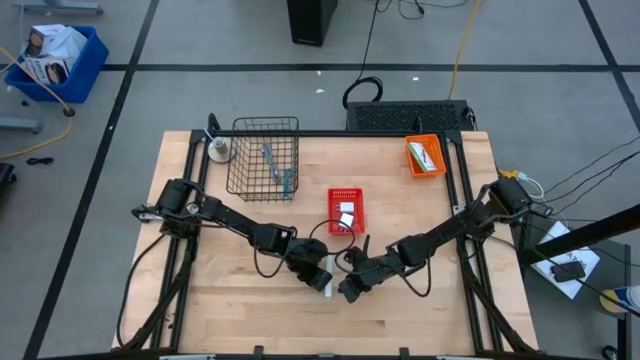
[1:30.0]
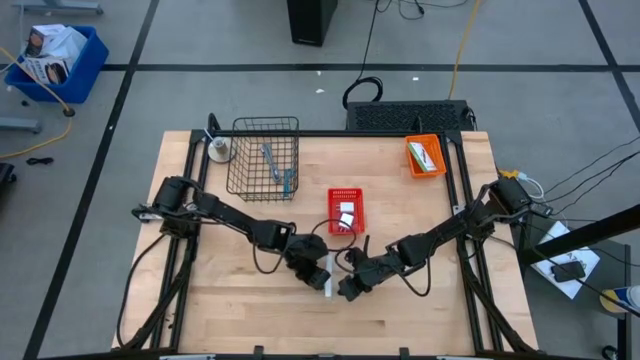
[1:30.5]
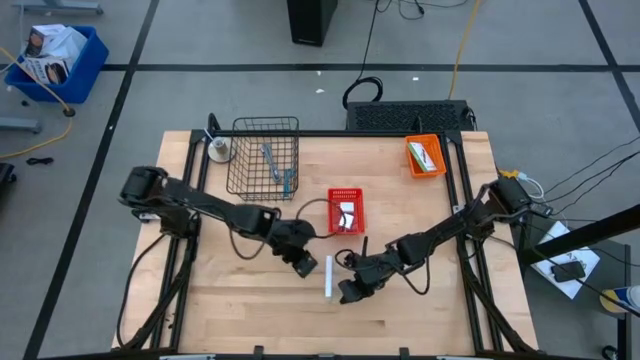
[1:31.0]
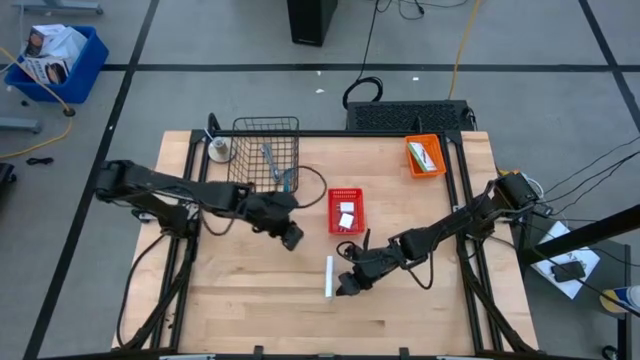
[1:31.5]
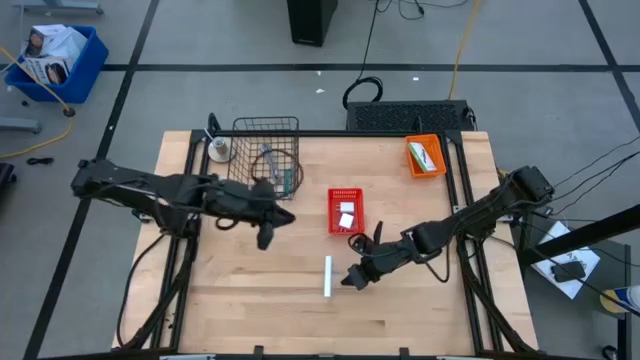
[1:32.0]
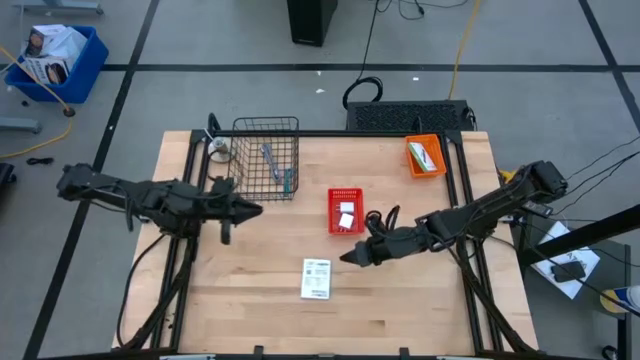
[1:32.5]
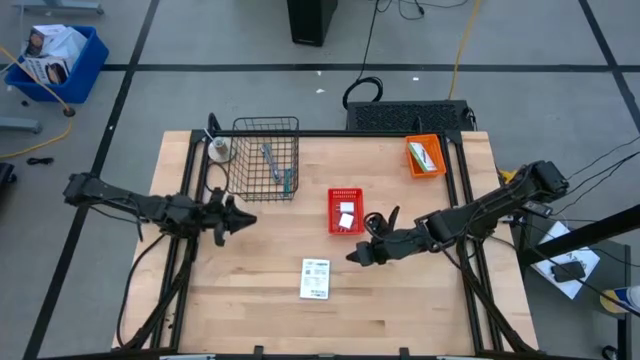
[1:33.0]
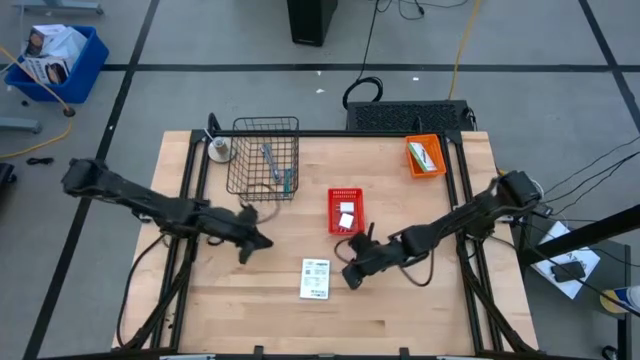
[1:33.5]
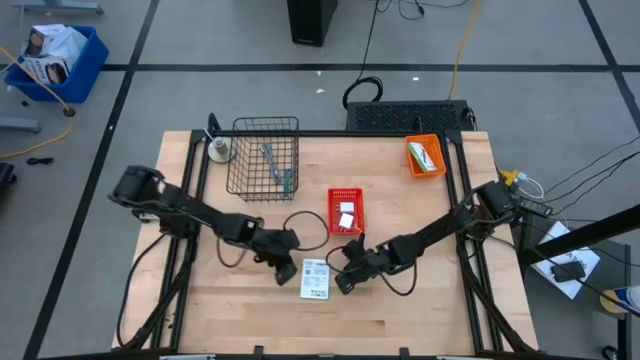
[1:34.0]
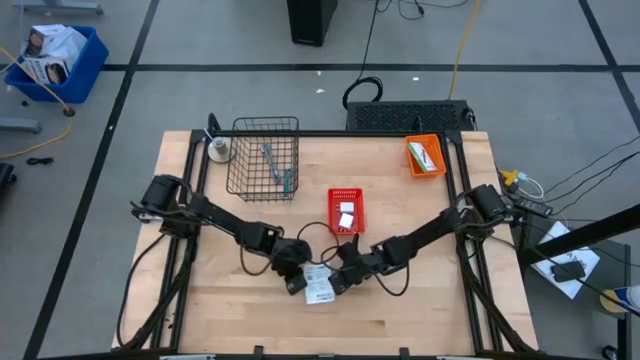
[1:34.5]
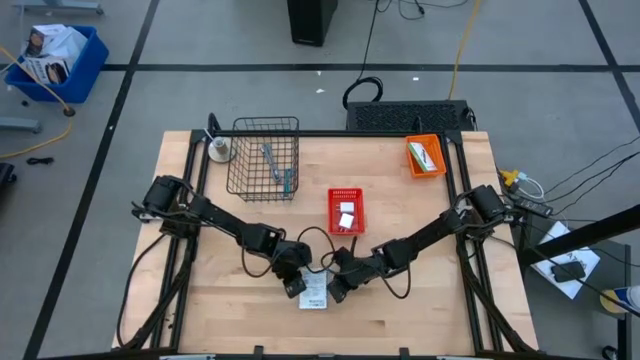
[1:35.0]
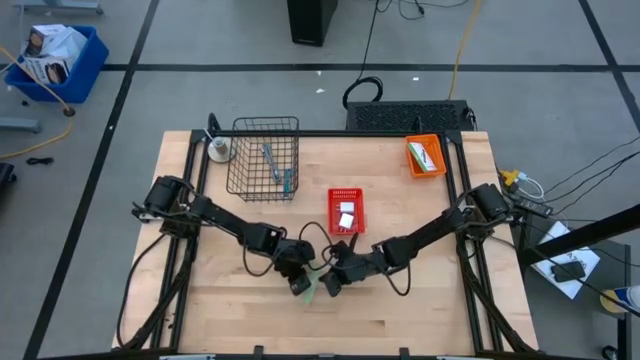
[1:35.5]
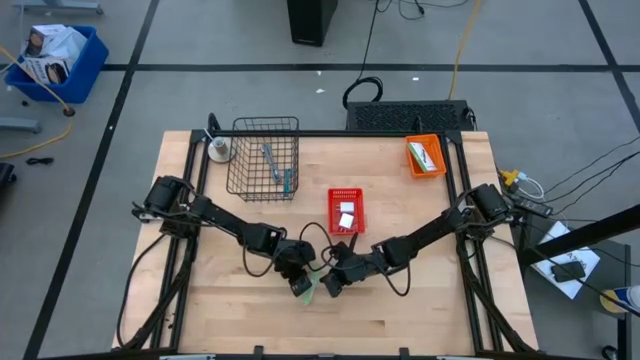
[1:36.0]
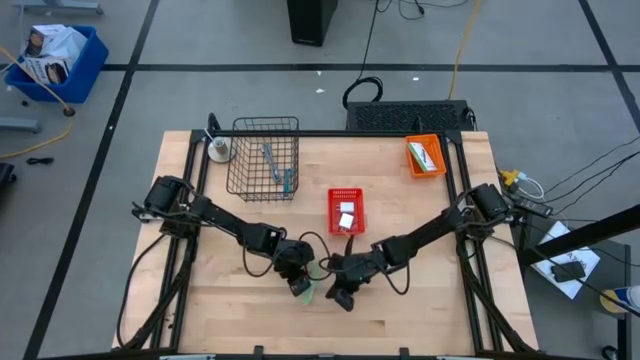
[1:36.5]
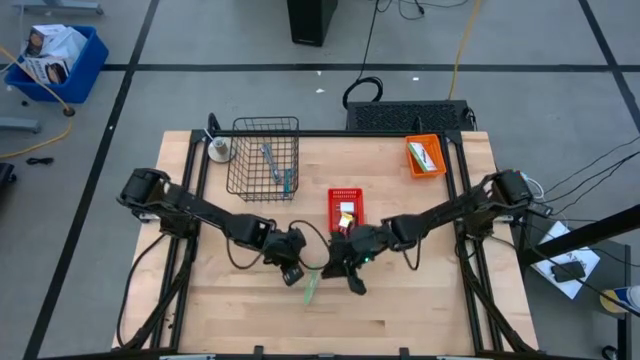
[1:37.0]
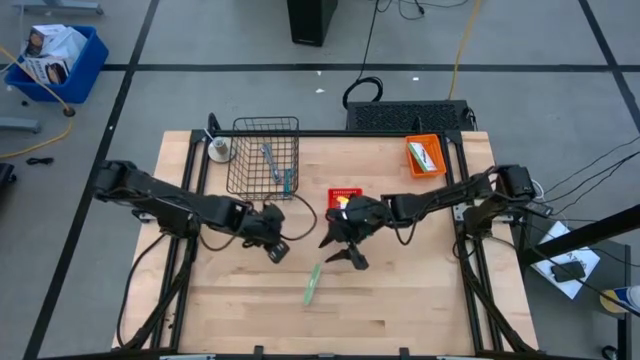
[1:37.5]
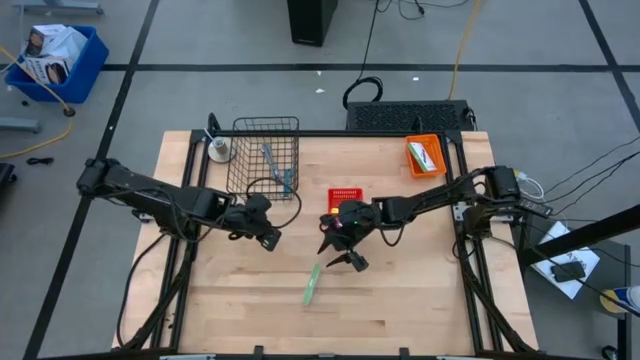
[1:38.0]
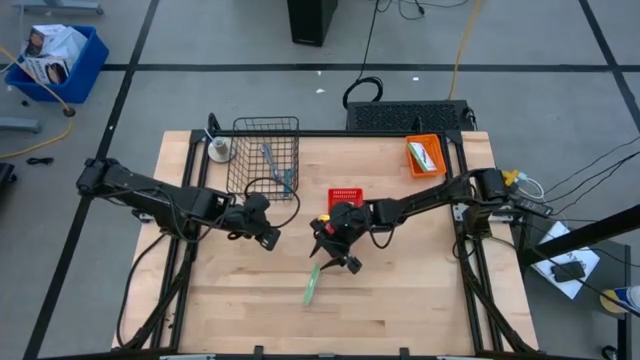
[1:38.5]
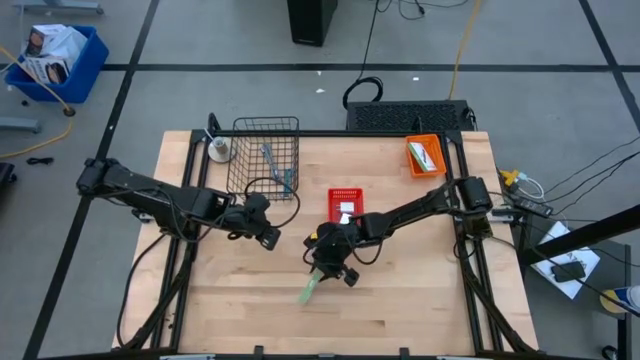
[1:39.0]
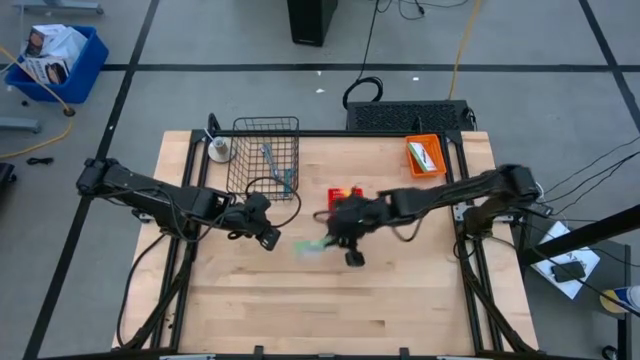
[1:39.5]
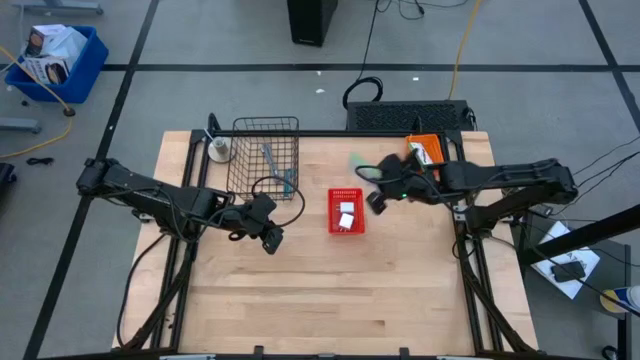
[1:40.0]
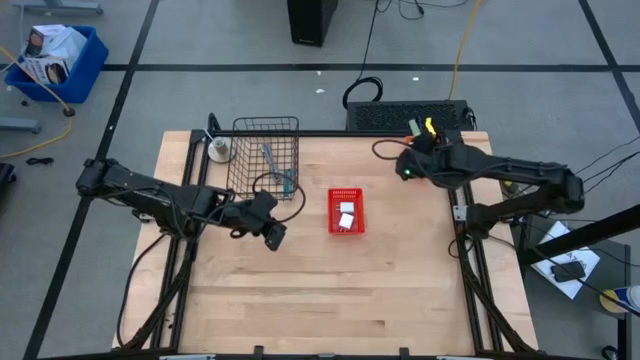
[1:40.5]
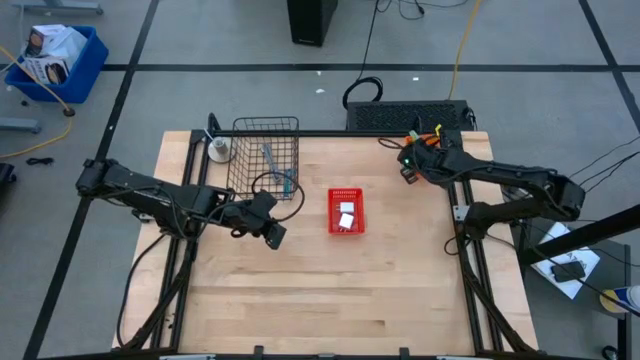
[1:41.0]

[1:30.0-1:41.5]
Task: Pick and place items into bin
Put the white card reader box into the orange bin

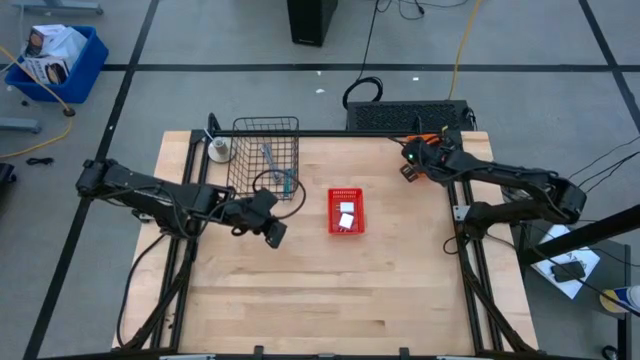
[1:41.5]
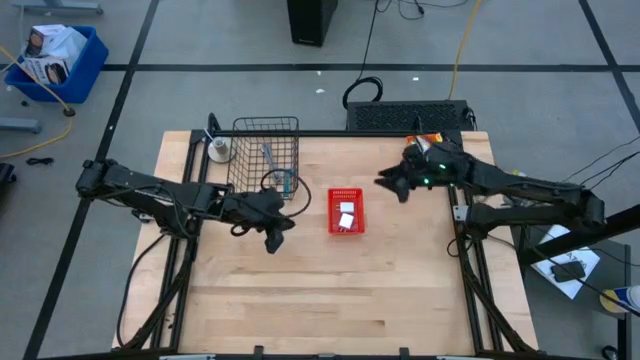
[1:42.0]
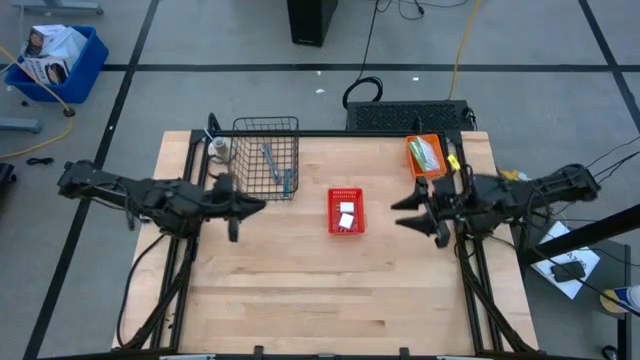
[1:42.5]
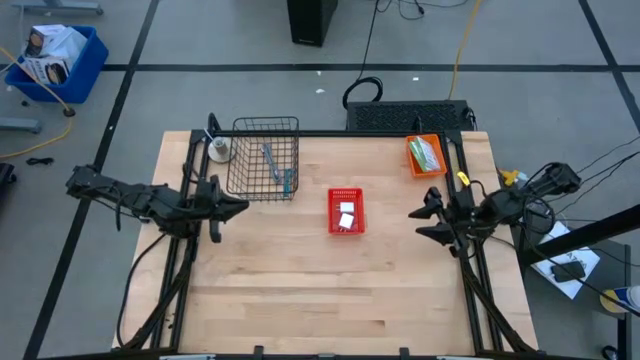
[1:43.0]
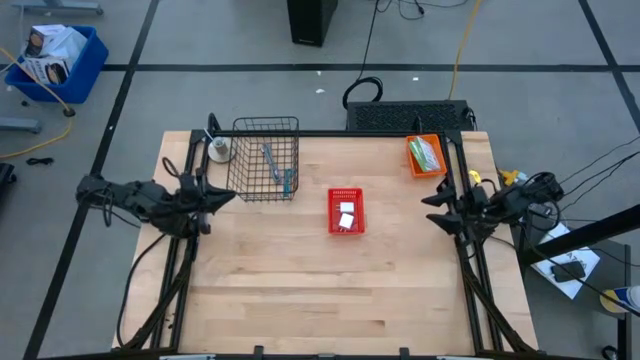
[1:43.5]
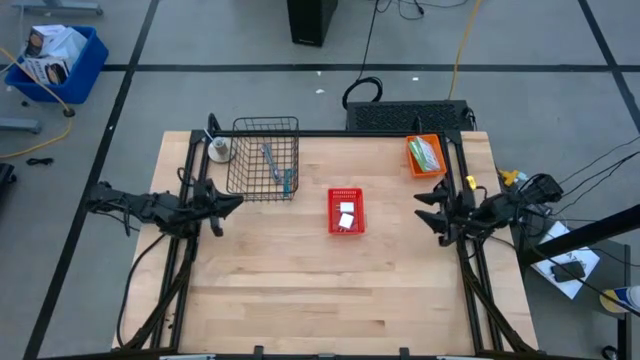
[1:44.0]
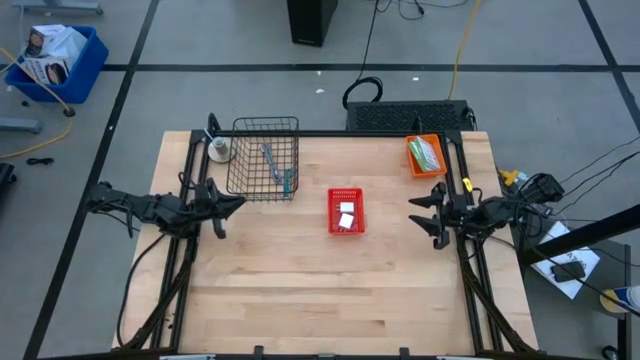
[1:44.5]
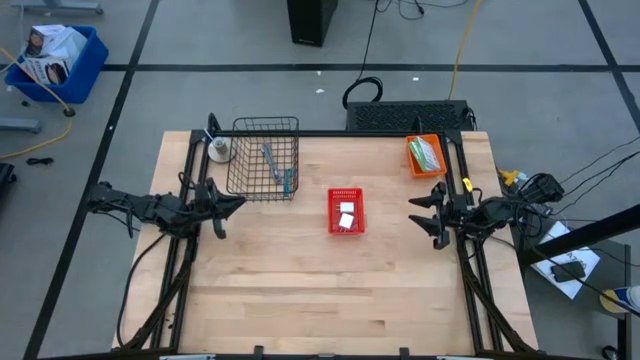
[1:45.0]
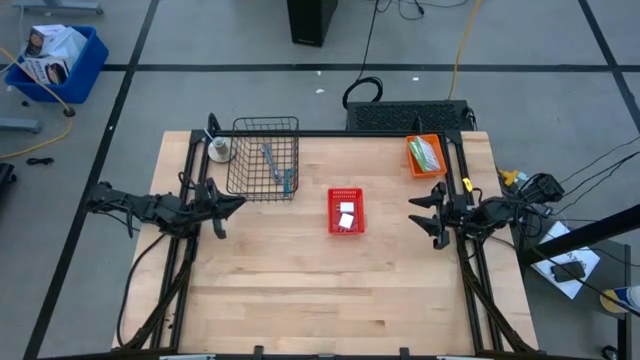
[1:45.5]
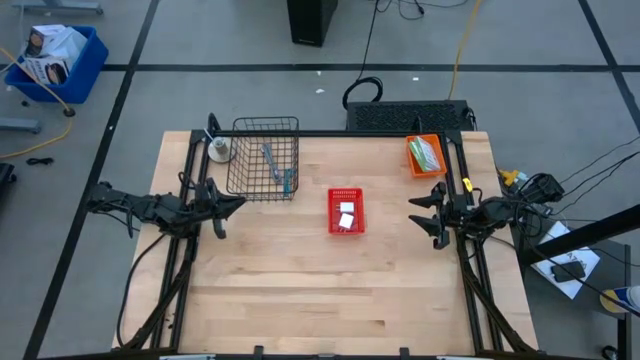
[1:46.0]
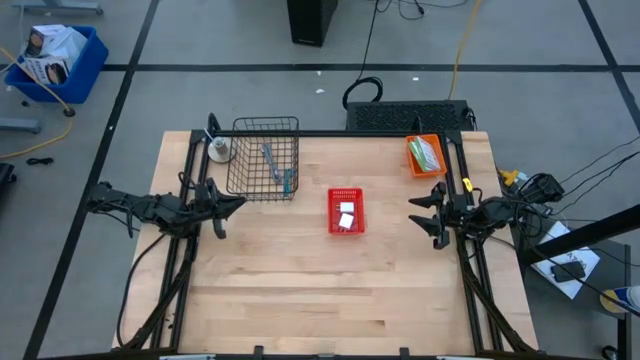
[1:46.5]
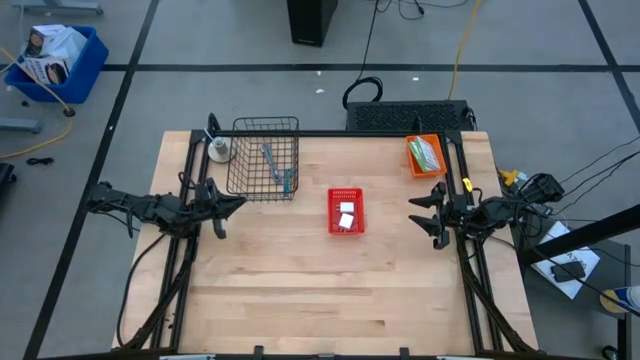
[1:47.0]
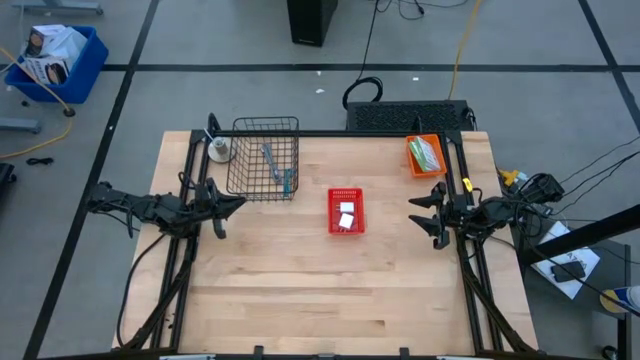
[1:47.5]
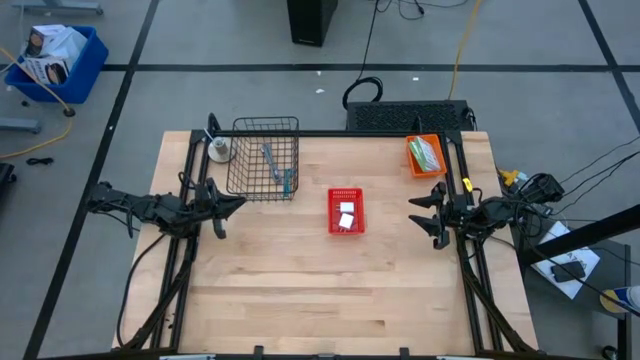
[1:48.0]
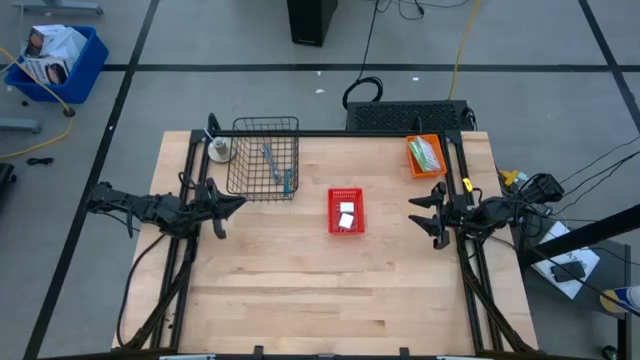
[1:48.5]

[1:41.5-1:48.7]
Return to Home Position

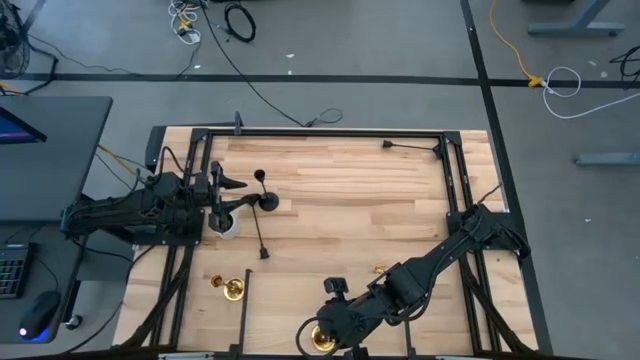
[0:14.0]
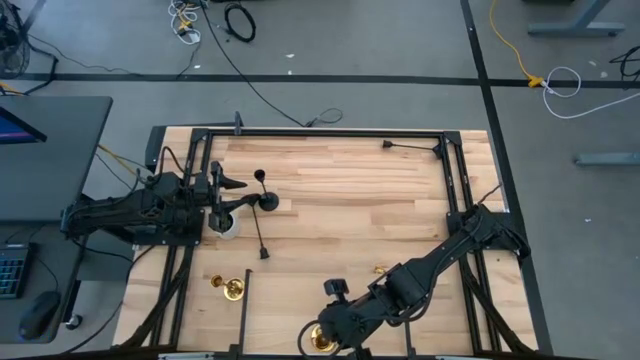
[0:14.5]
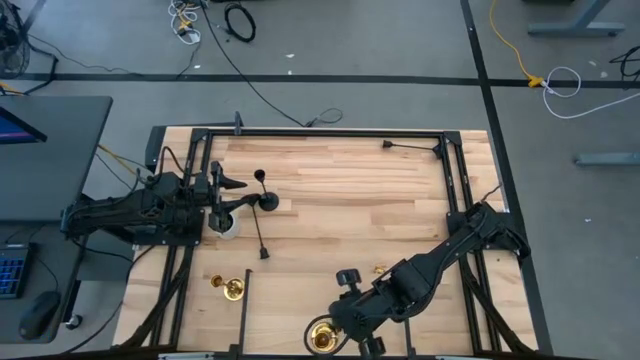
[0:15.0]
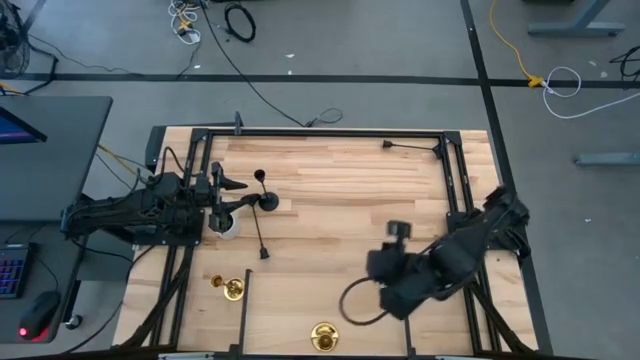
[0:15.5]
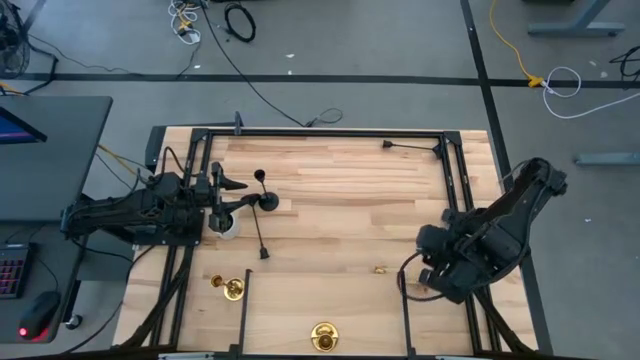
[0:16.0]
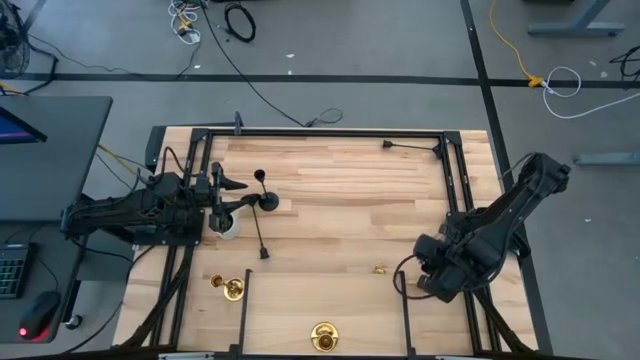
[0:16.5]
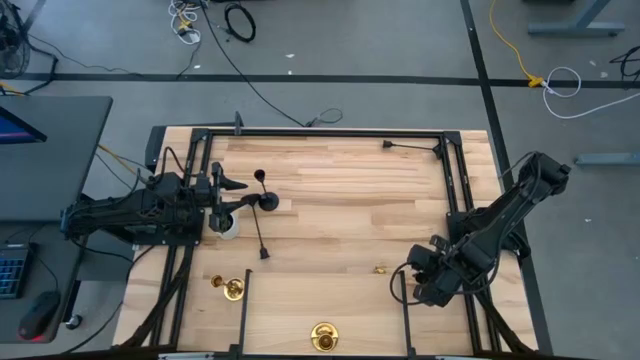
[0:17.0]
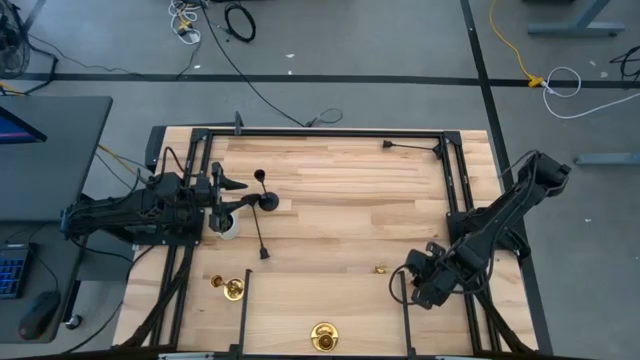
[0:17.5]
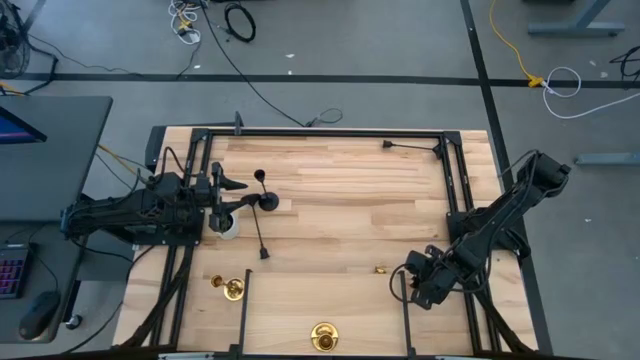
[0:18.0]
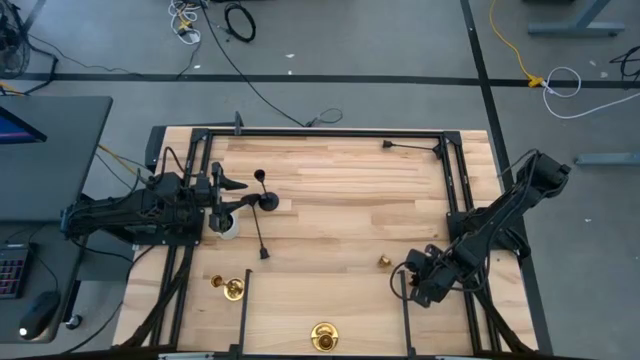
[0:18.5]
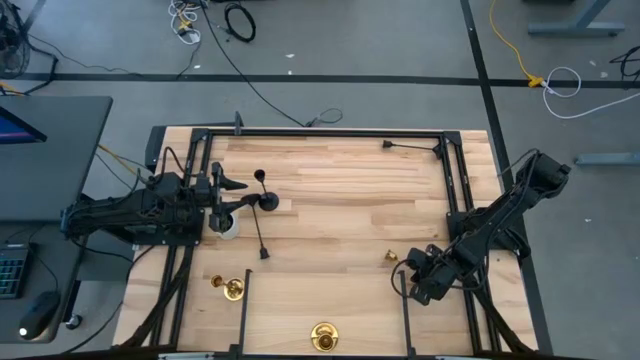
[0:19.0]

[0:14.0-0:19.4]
Task: Pick & Place candle stick holders
Put the right yellow candlestick on the shelf
